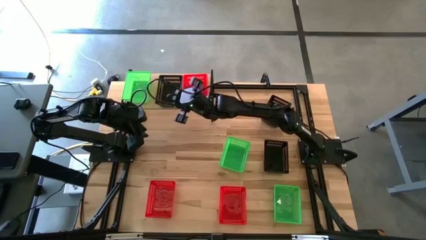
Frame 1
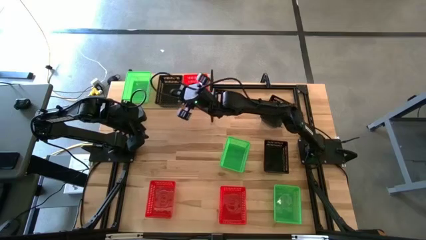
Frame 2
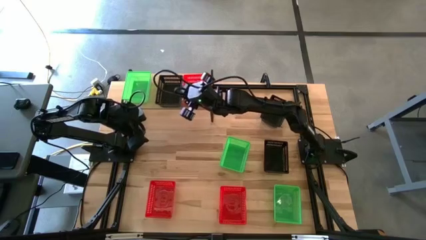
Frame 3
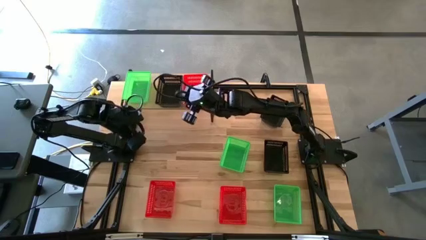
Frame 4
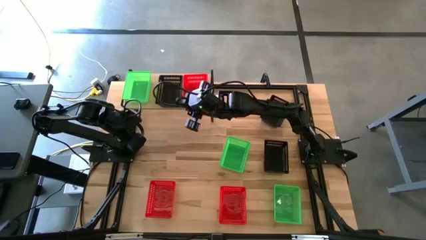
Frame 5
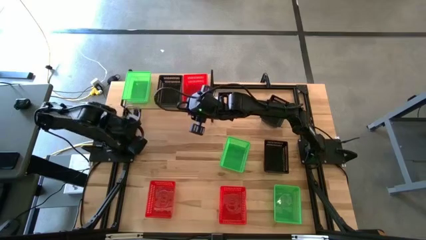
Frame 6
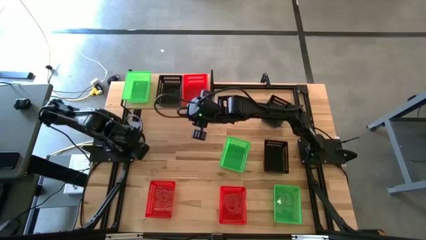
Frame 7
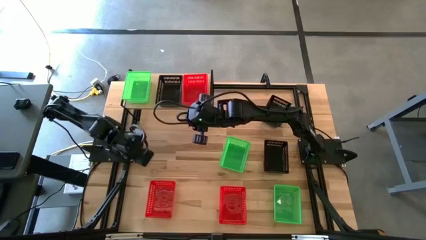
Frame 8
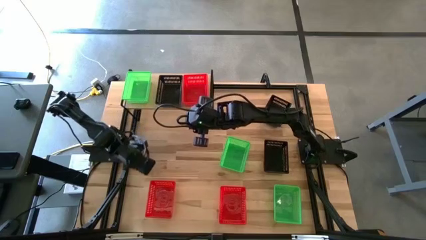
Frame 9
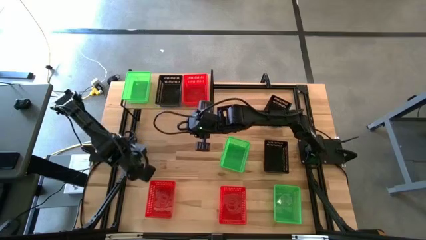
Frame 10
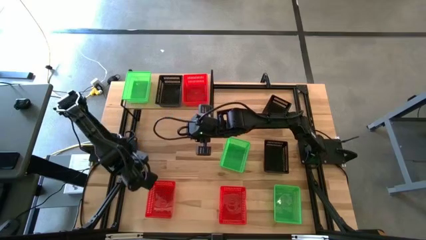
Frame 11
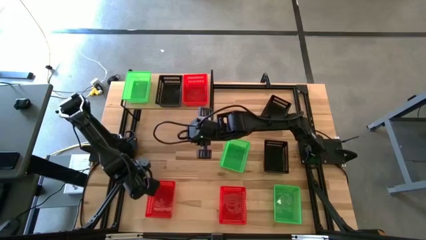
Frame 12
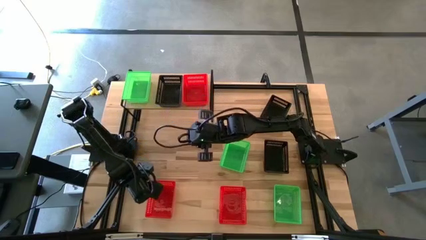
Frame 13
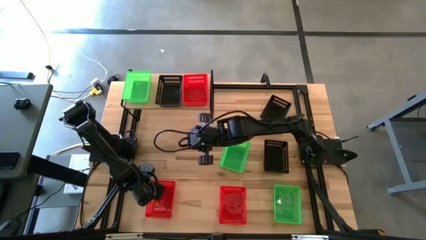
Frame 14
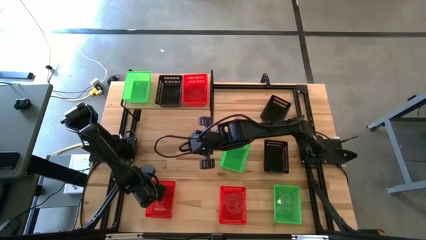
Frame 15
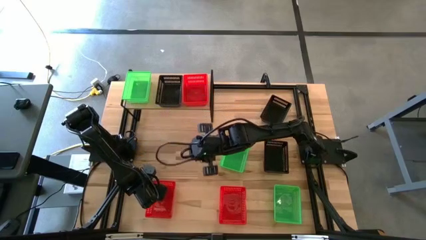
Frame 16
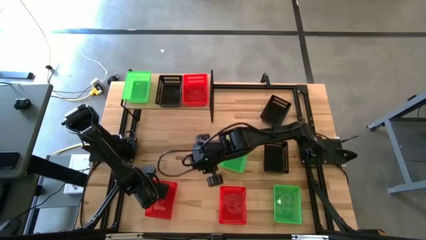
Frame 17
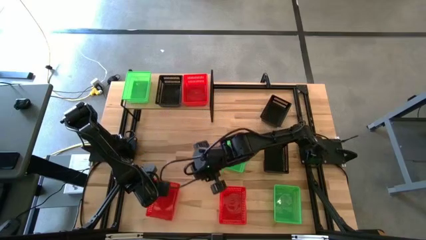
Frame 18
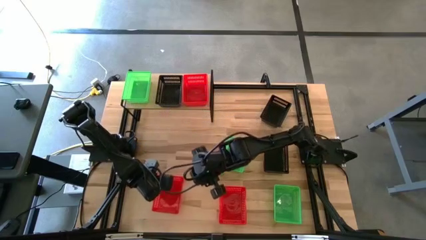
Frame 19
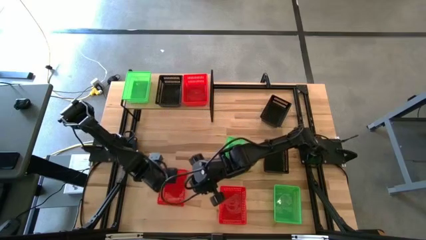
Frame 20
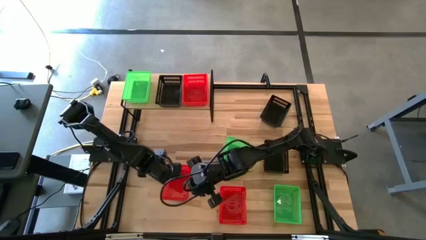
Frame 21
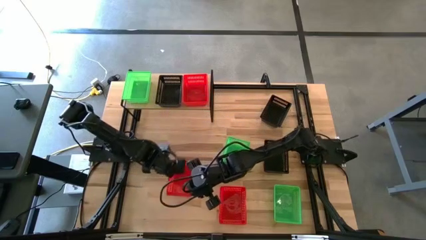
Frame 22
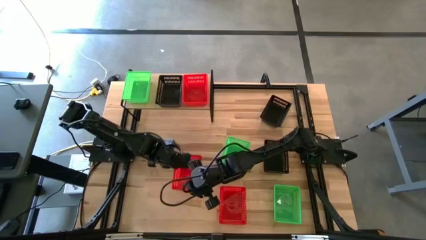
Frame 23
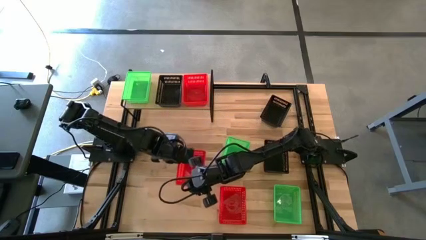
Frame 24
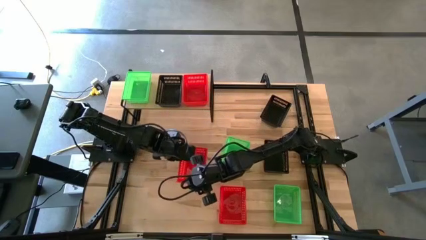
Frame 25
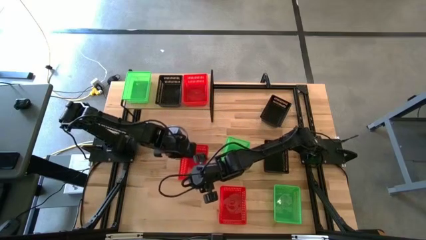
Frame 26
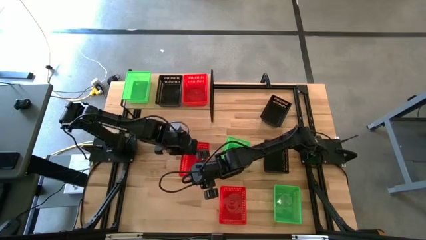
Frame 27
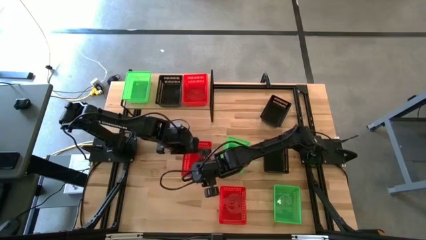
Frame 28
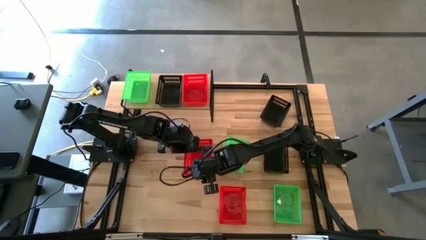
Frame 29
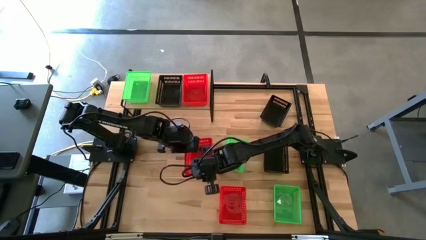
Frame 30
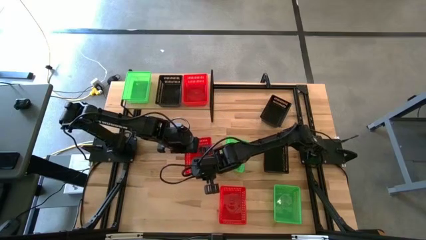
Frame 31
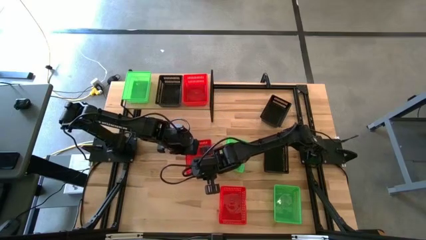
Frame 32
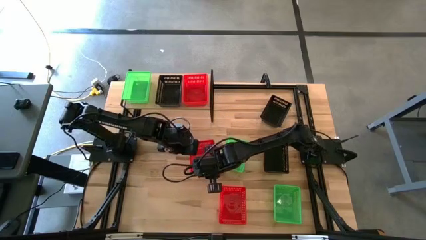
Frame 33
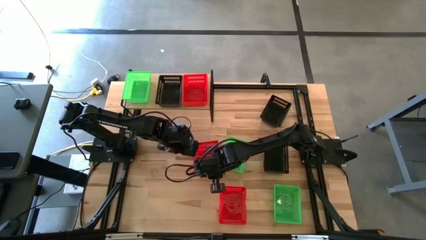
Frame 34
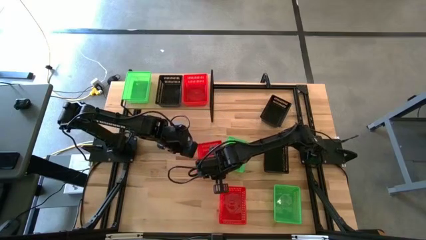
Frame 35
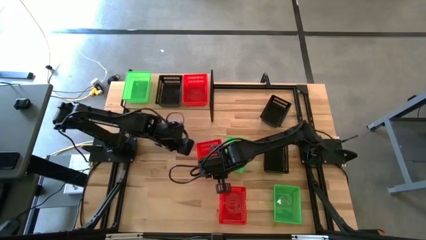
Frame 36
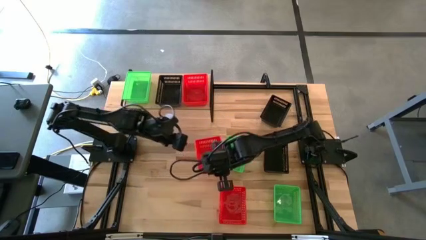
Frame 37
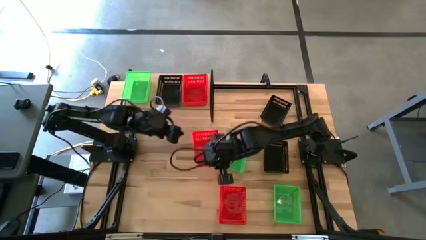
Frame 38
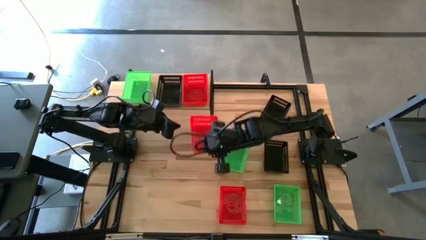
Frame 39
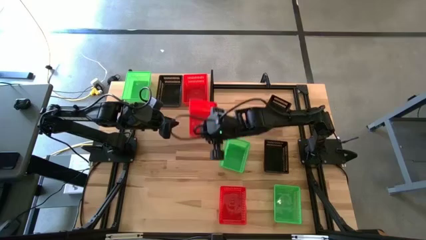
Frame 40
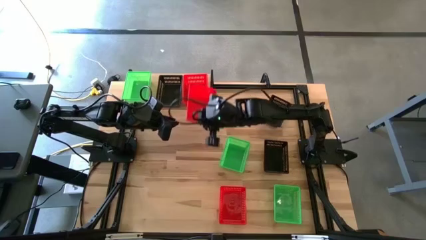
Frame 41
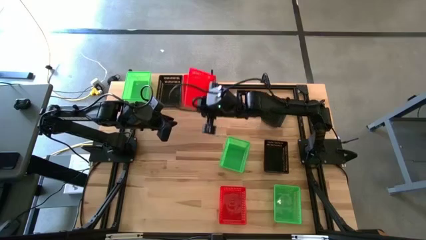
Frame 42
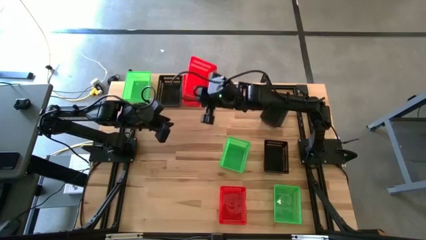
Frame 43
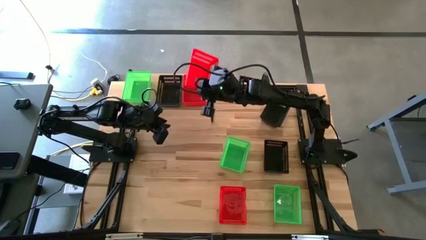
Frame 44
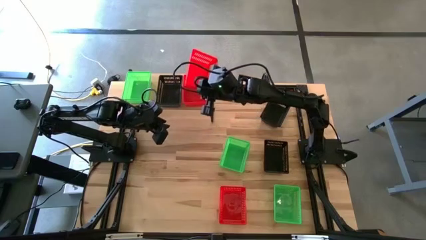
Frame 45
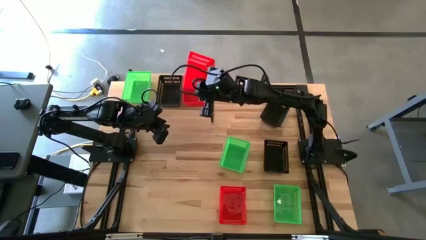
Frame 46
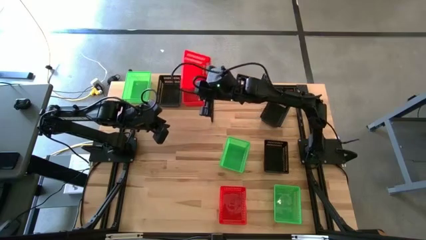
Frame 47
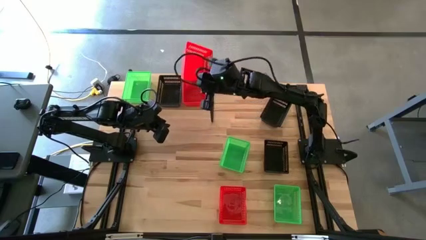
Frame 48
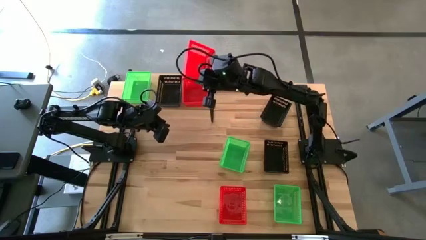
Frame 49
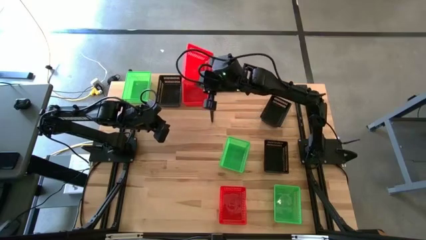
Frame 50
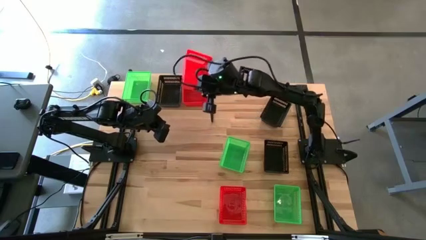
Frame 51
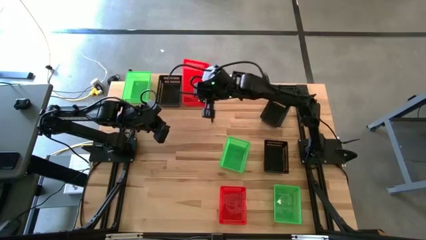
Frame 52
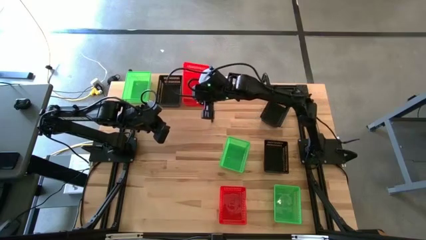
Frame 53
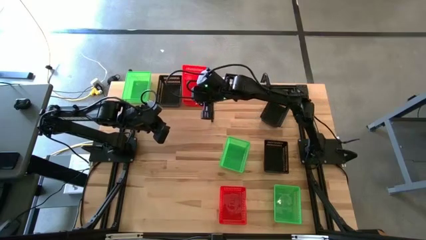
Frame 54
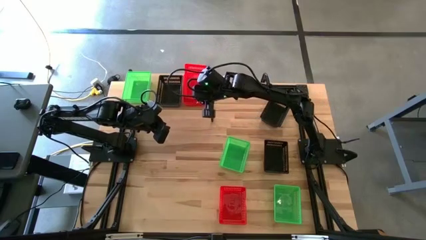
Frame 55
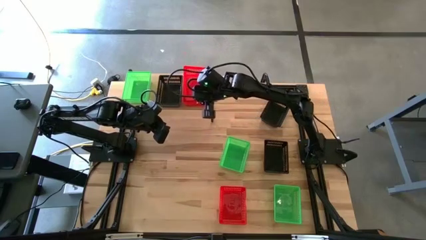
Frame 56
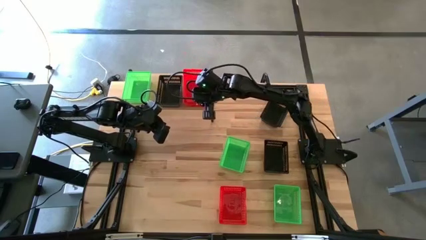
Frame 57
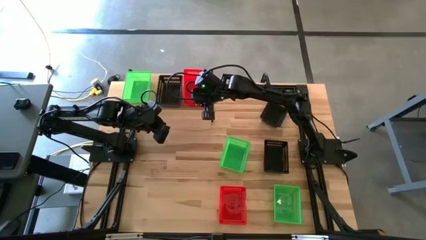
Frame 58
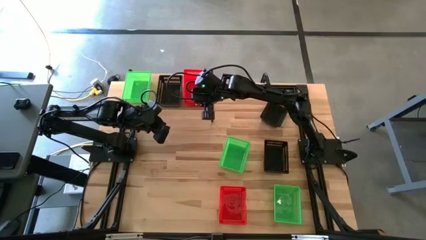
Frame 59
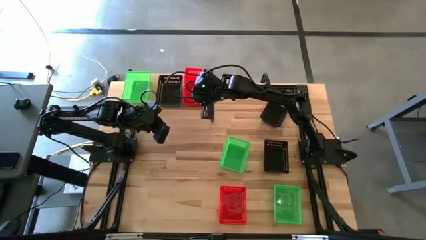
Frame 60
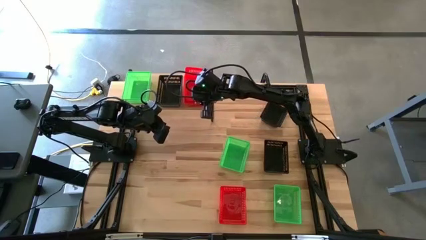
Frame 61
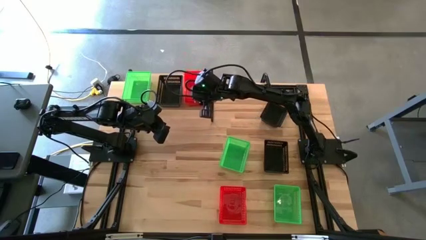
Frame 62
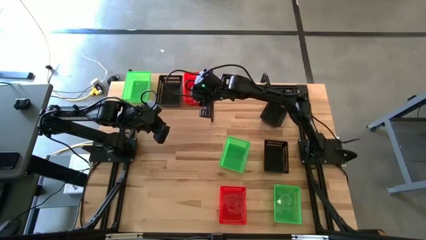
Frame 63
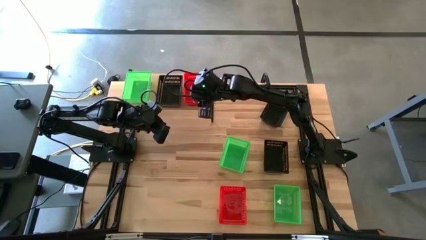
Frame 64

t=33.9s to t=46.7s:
Task: Stack baskets on shelf by color
Stack the left red bin on top of the red bin on the shelf

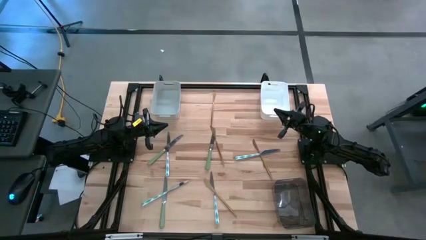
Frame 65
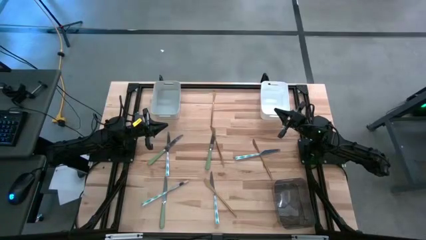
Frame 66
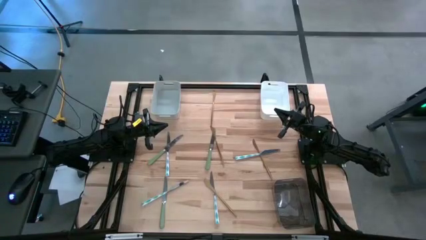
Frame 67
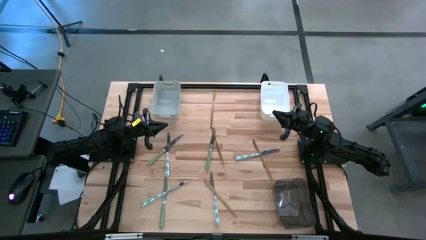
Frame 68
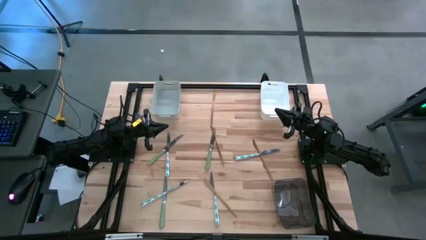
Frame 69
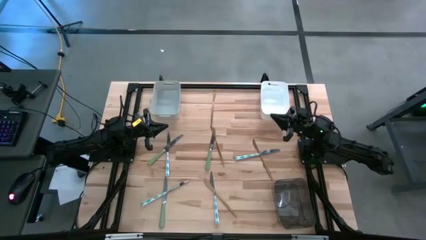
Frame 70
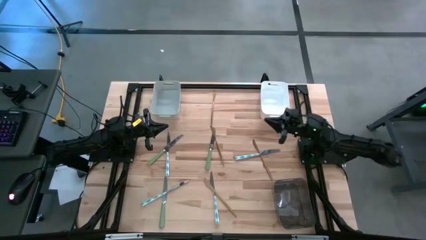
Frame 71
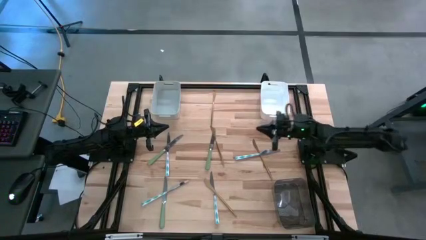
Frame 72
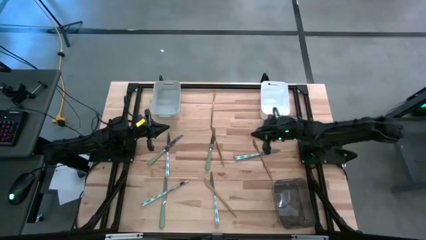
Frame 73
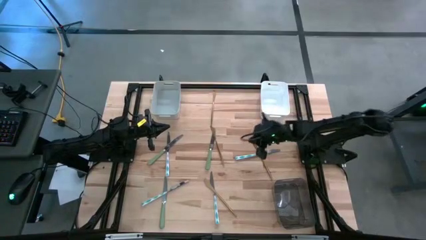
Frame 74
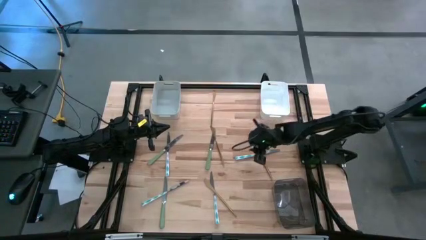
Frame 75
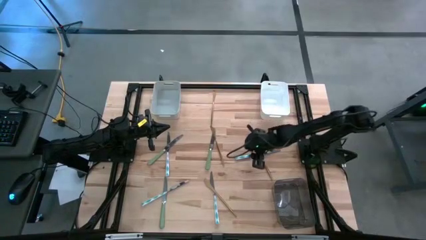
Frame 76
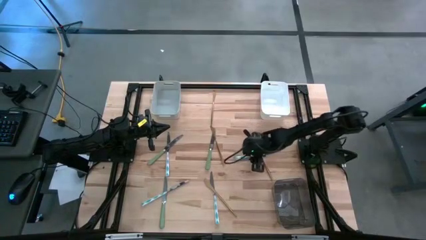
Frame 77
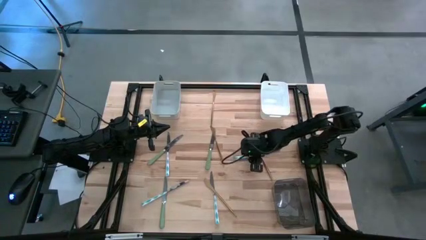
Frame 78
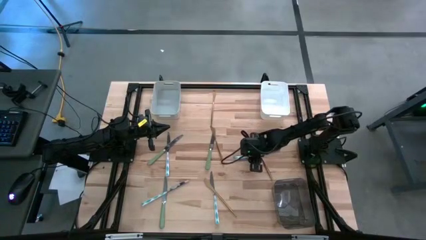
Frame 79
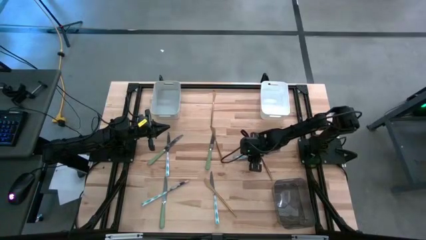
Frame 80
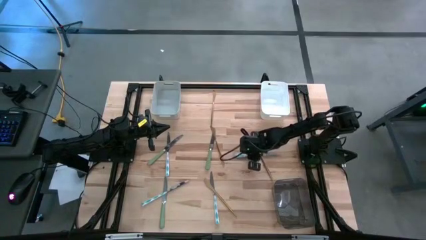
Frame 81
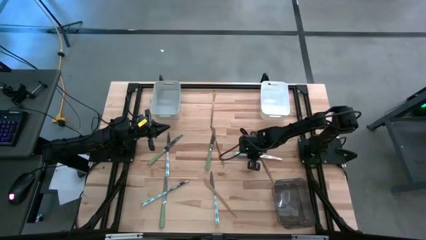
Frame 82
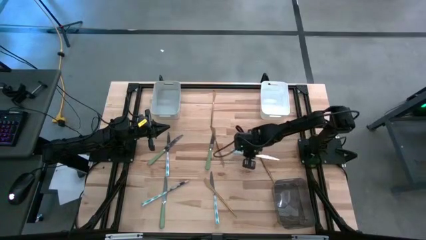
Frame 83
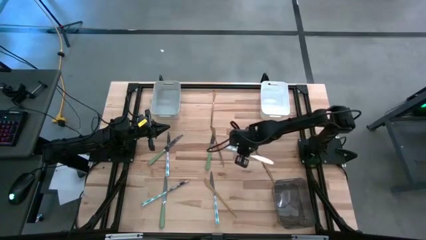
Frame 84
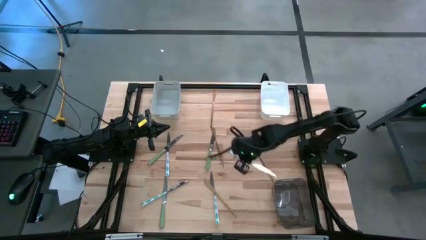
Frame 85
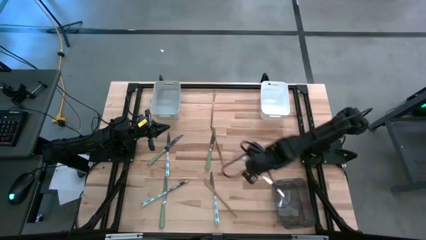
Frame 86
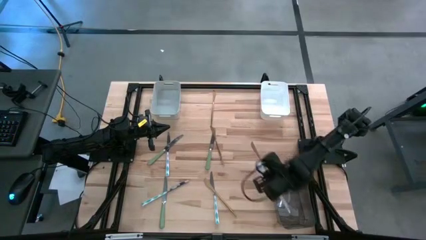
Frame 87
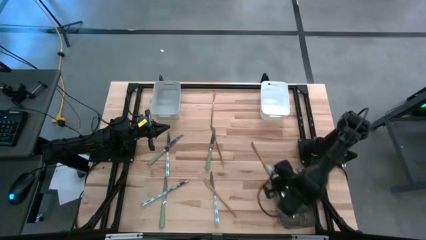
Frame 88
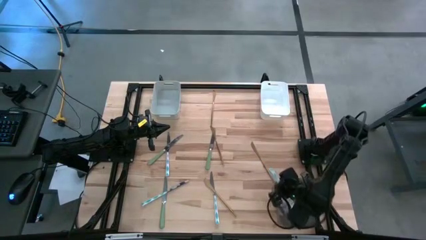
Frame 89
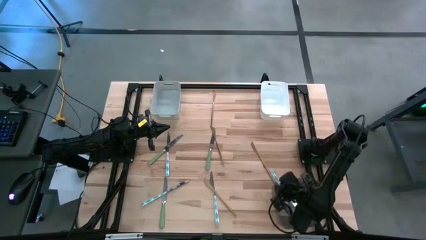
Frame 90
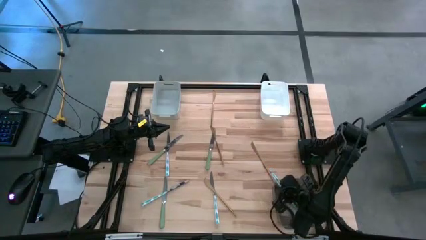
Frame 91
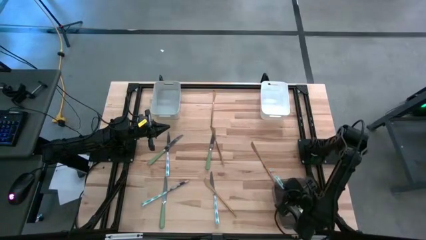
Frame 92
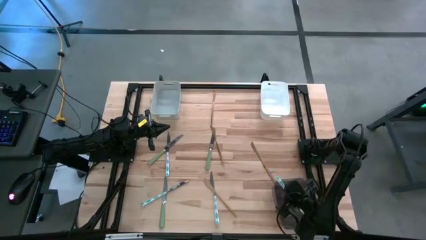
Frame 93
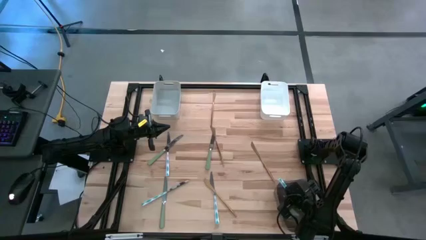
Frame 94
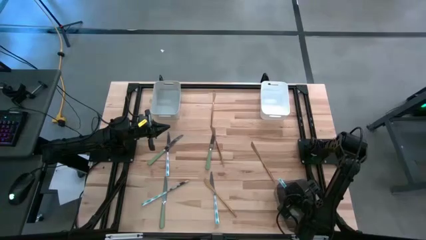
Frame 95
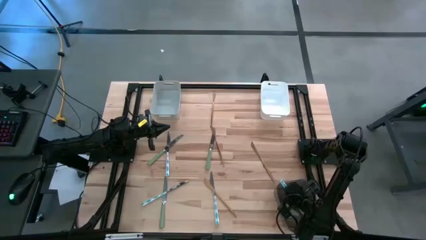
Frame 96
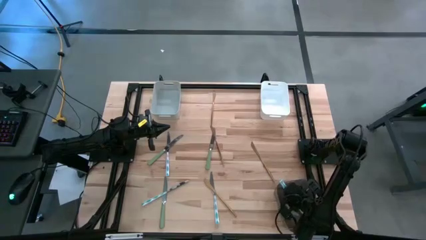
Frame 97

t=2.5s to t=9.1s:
Task: Sort silverware by color (type)
Put the top right blue knife into the black bin
